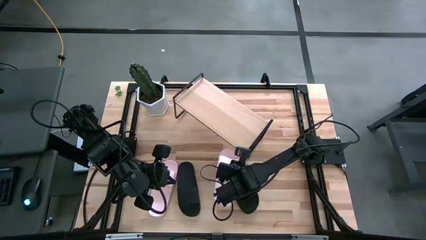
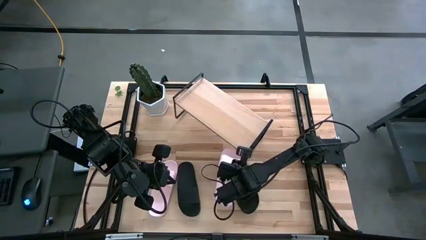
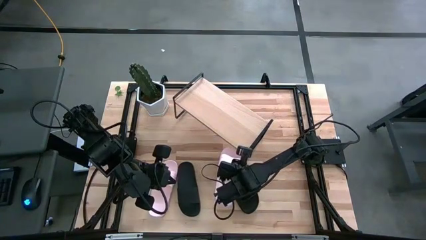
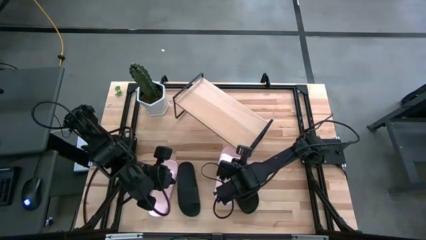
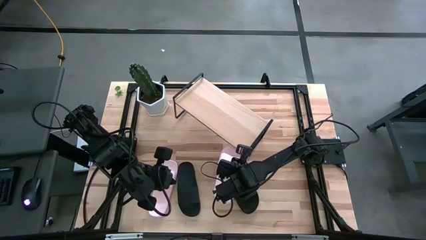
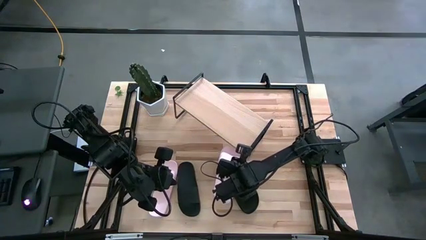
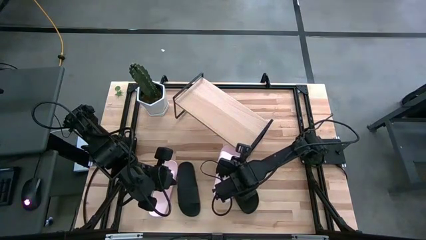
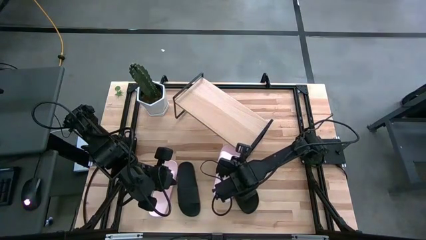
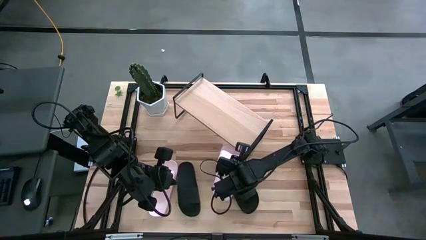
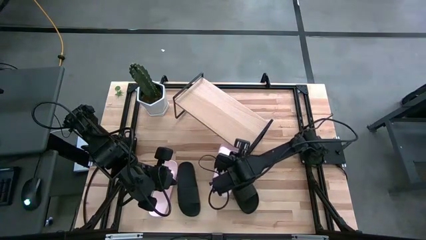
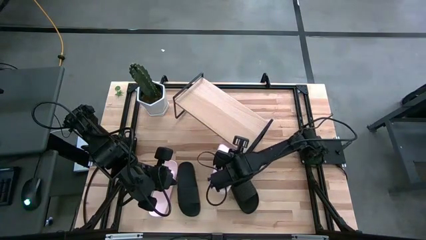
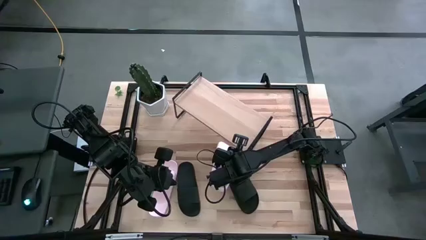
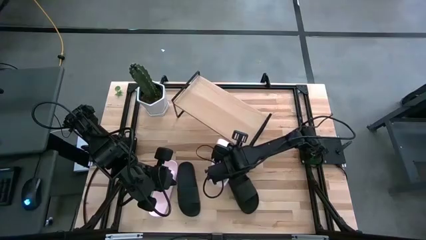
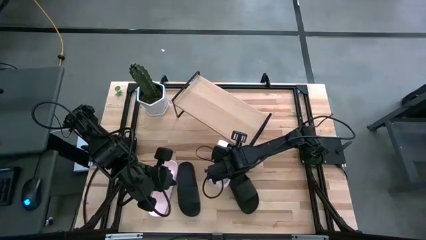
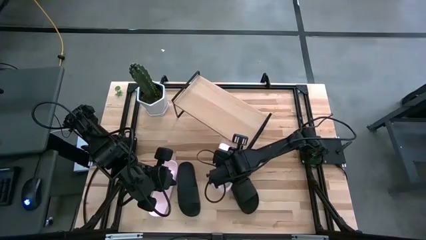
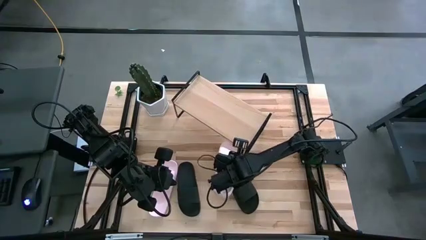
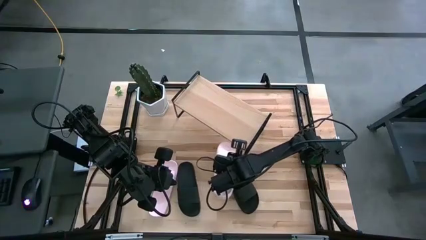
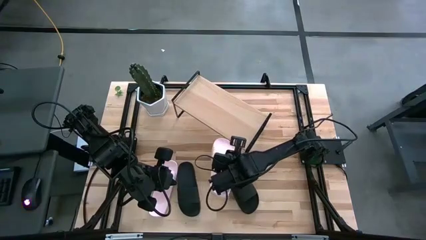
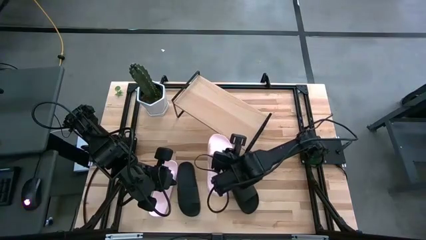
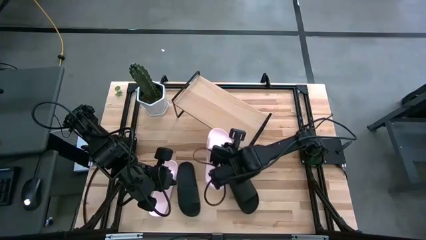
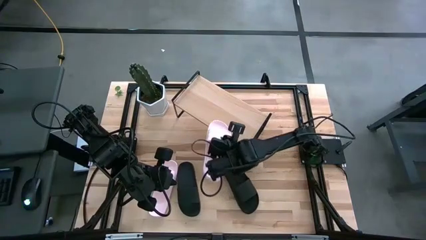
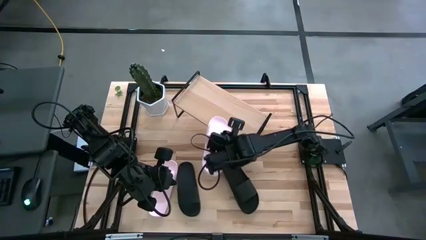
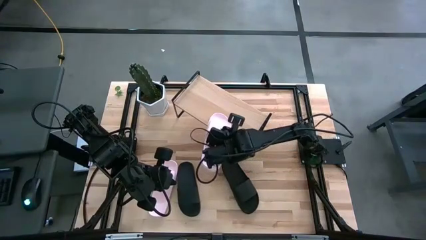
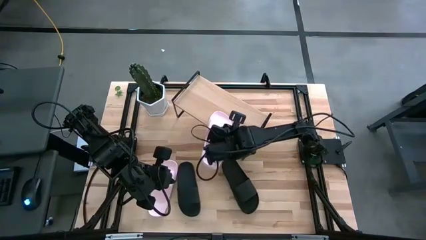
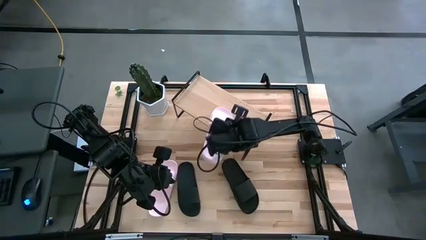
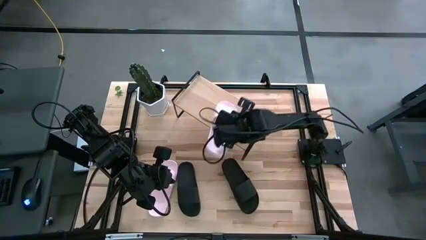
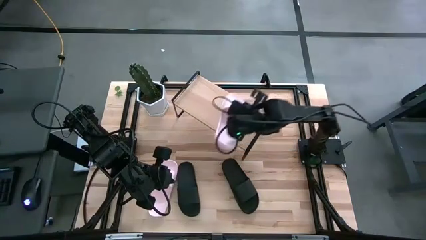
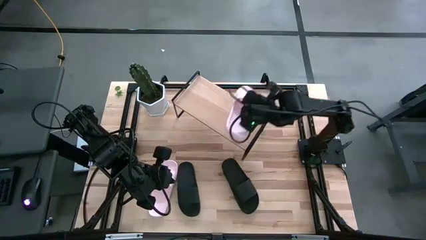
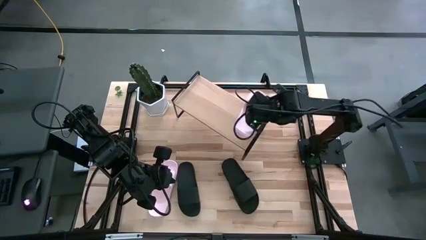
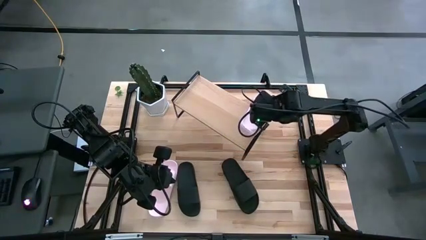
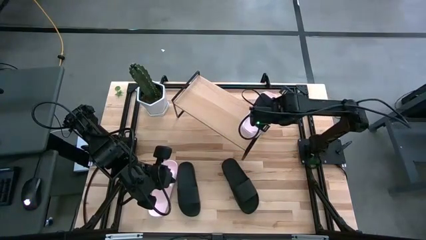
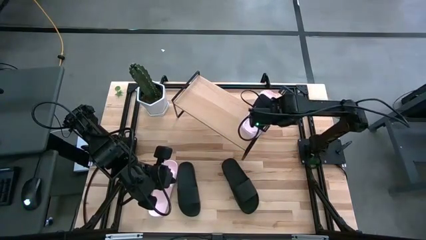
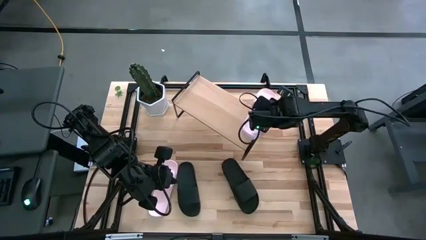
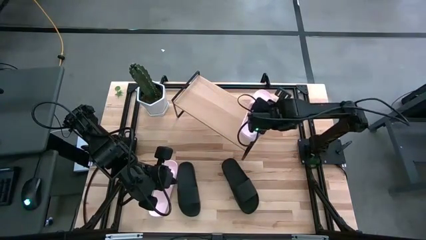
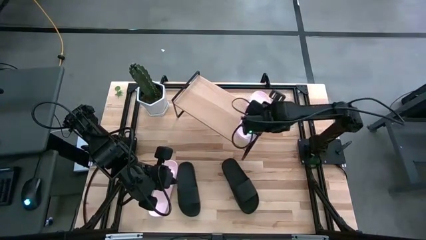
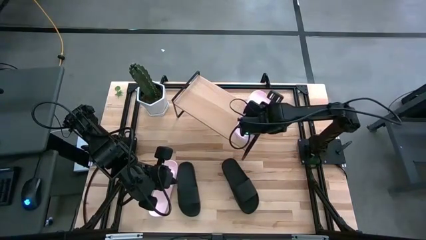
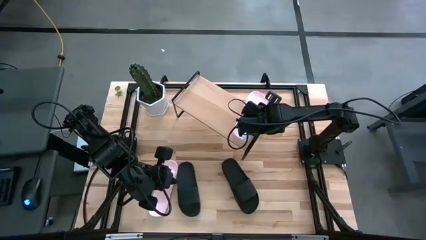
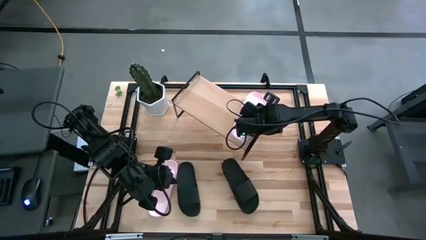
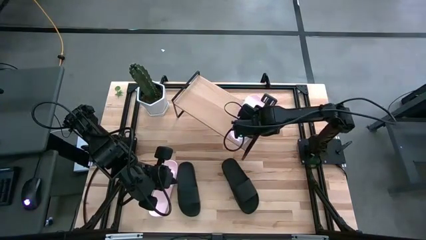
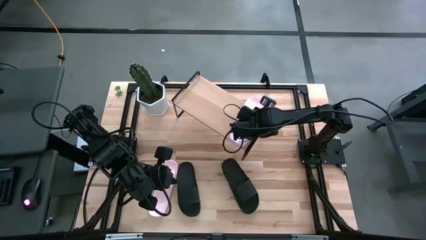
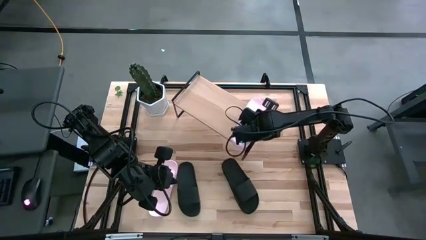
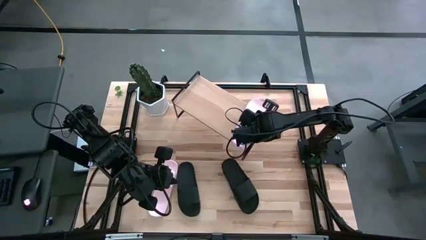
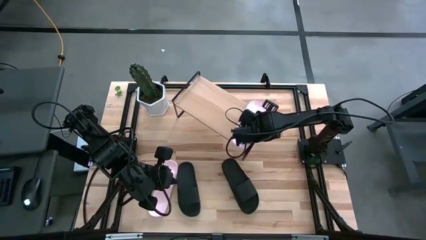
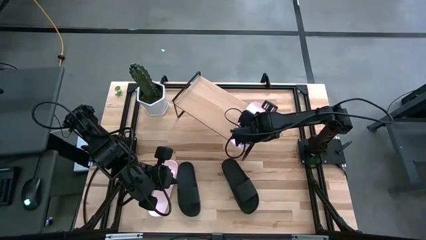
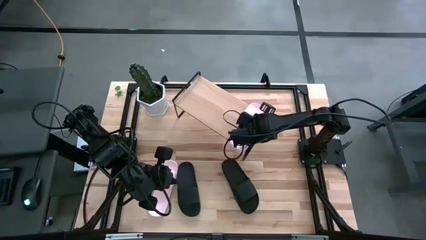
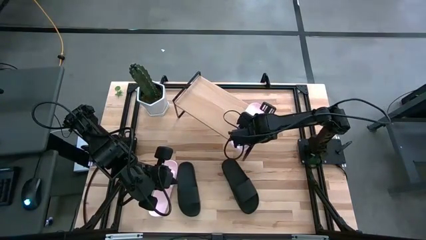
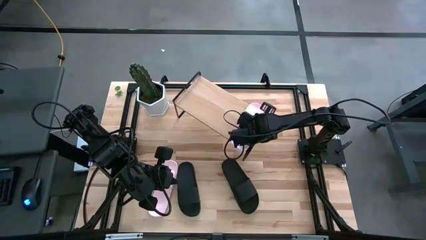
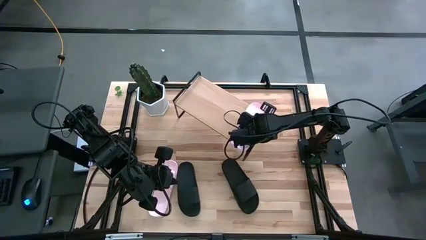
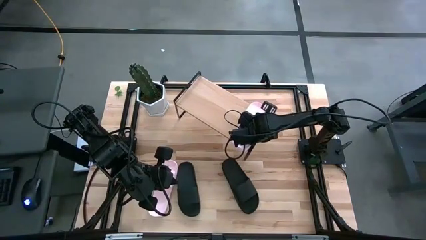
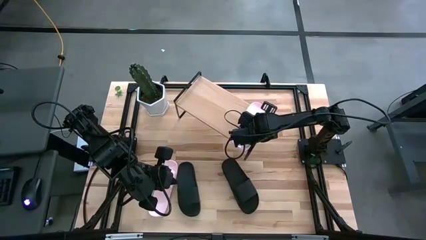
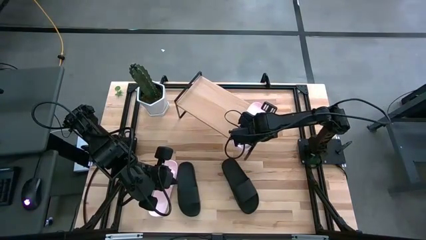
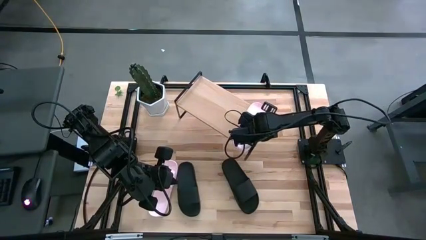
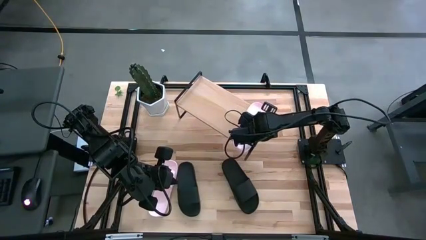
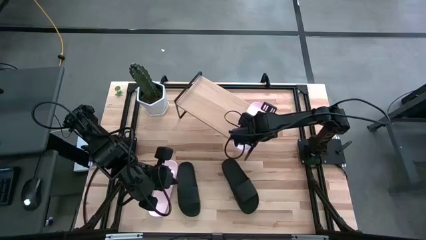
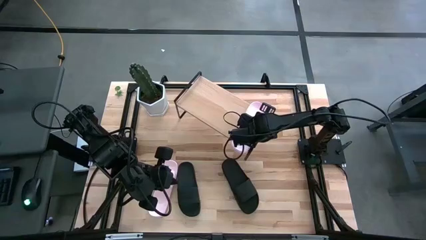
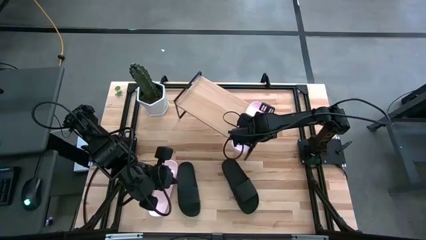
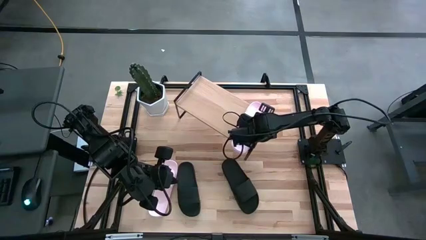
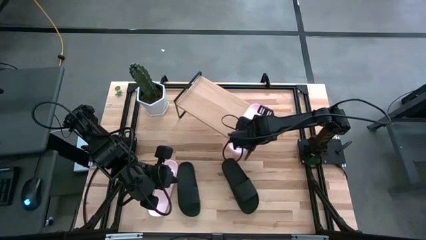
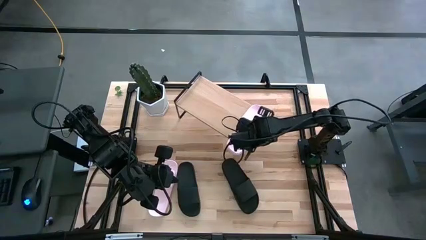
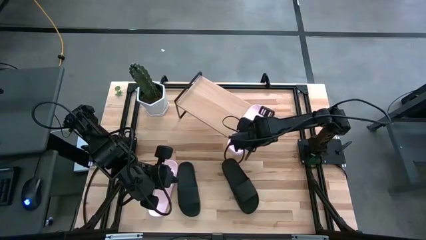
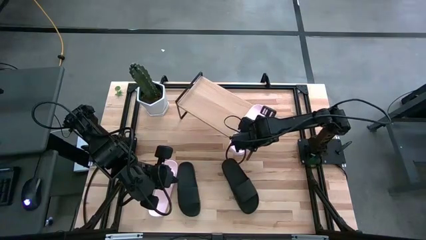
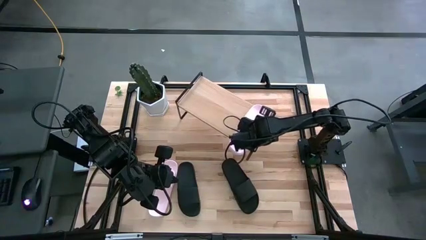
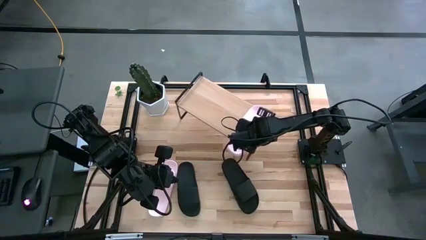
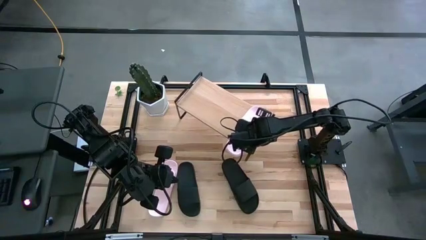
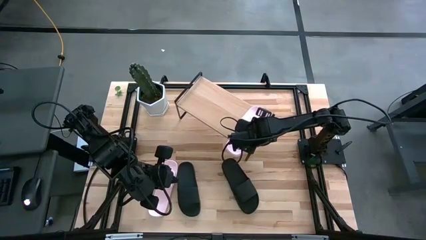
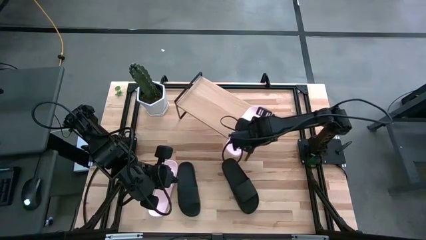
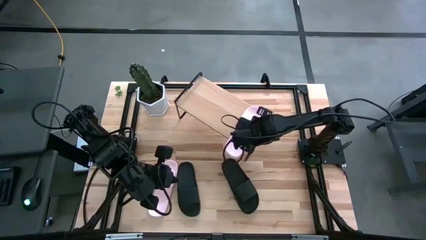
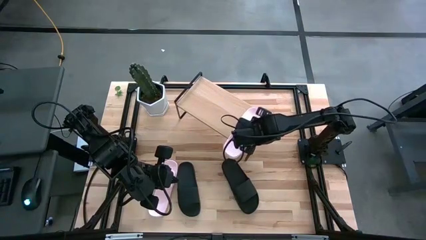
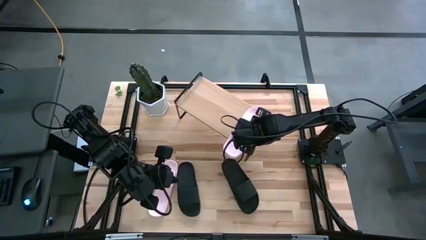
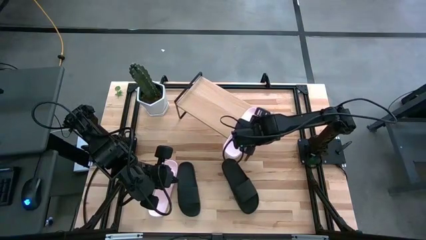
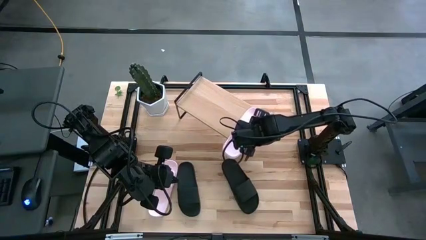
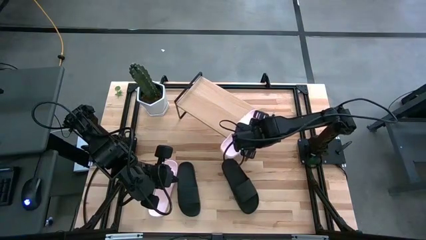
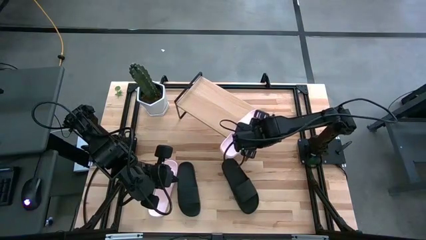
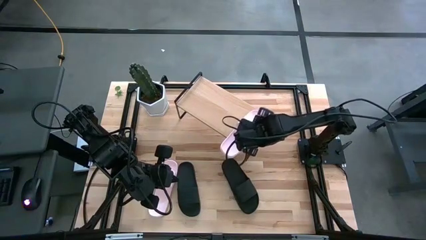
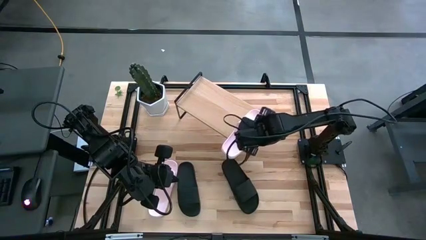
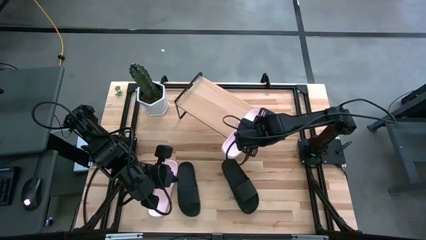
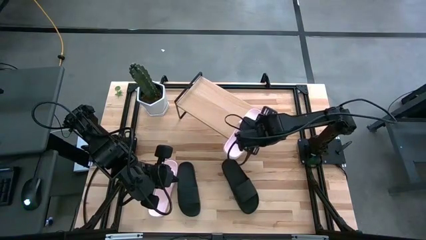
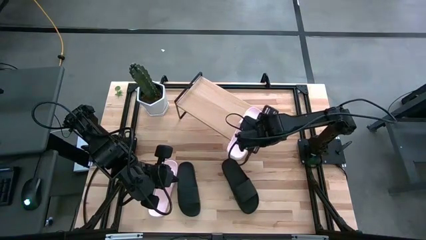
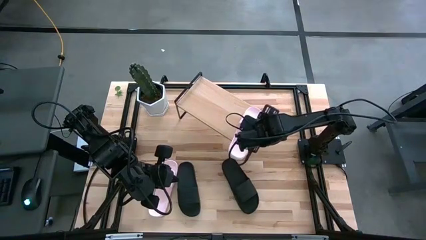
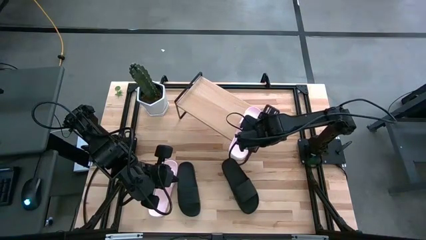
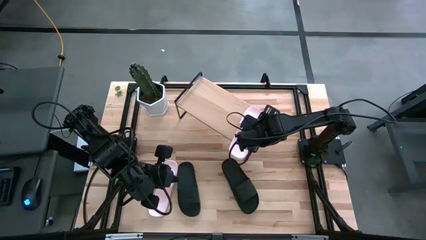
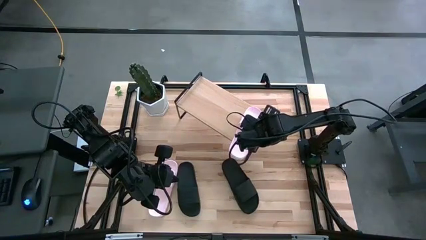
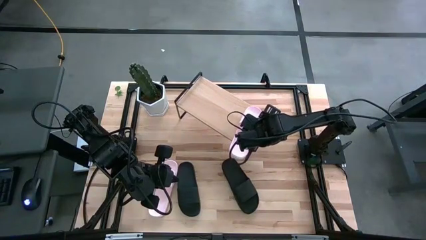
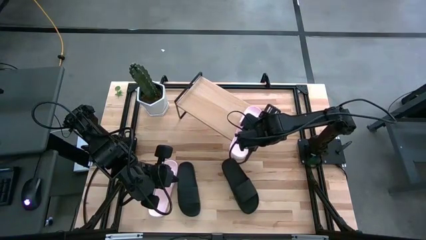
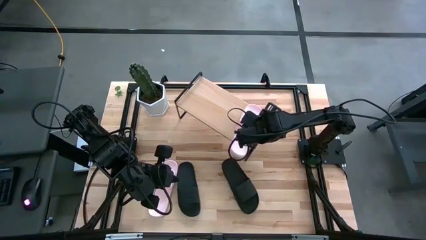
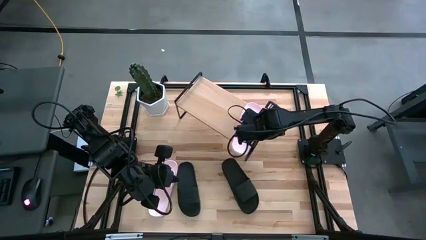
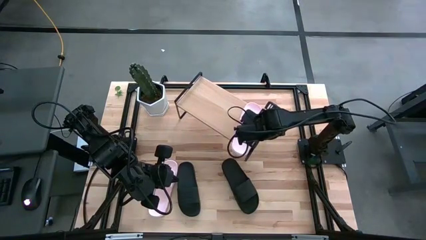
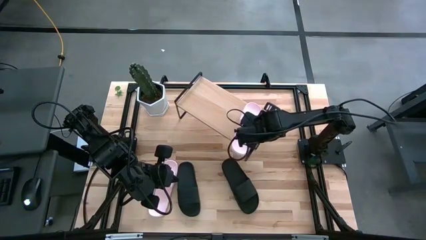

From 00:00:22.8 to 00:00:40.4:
Task: Pick and place slides into the shelf
Put the right pink slipper on the shelf
